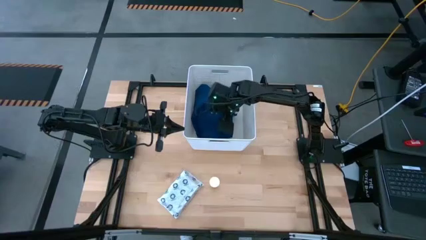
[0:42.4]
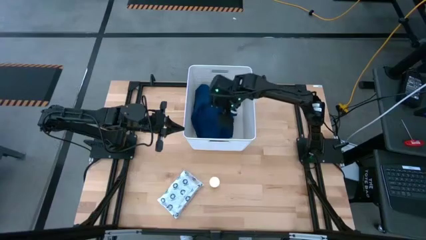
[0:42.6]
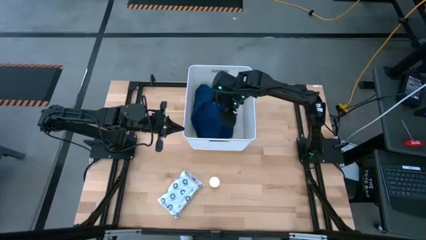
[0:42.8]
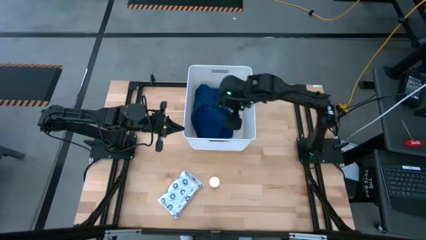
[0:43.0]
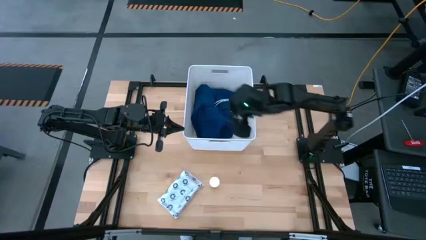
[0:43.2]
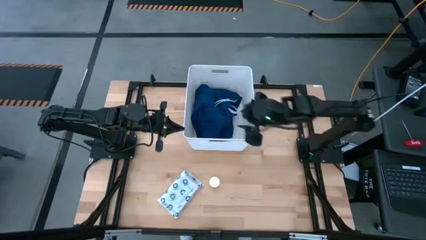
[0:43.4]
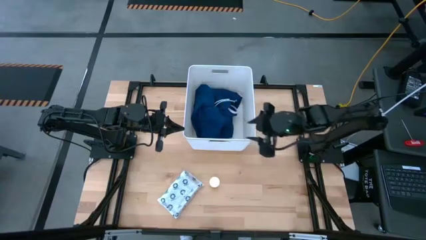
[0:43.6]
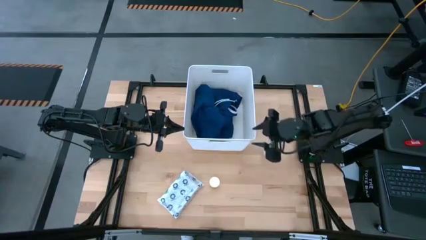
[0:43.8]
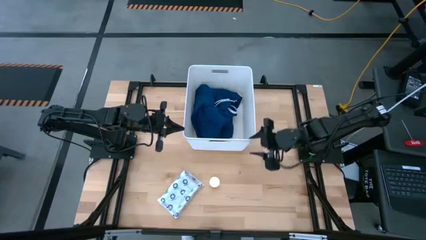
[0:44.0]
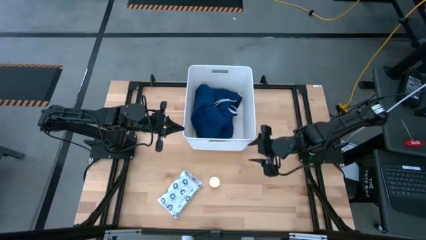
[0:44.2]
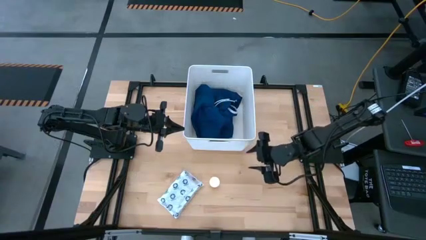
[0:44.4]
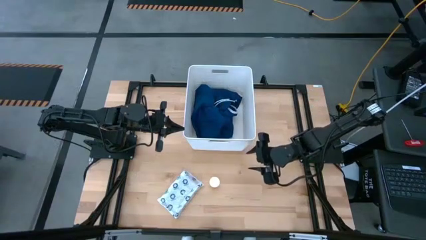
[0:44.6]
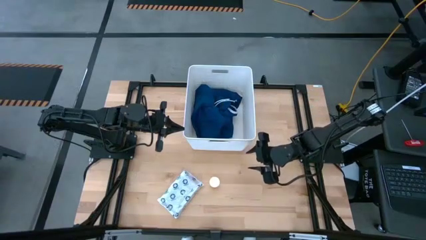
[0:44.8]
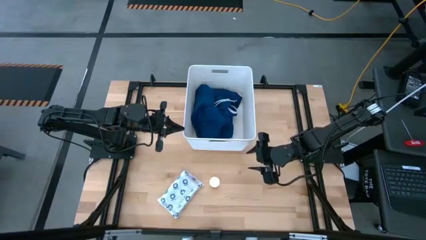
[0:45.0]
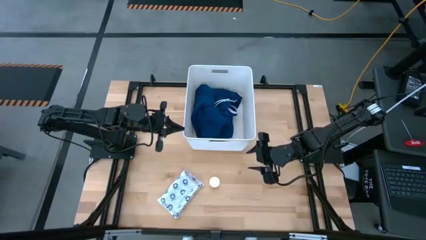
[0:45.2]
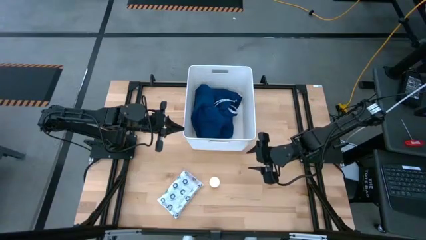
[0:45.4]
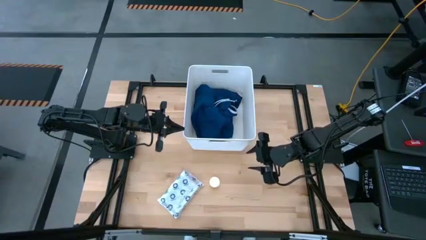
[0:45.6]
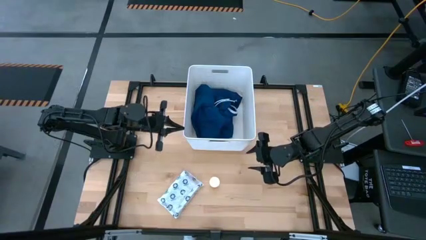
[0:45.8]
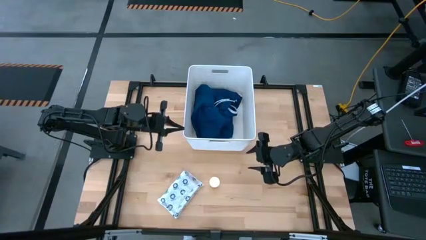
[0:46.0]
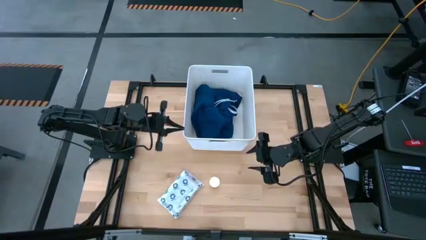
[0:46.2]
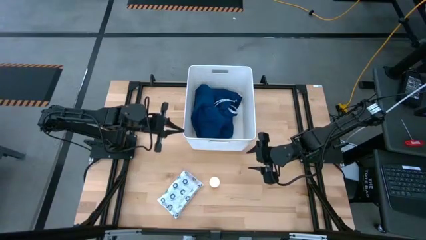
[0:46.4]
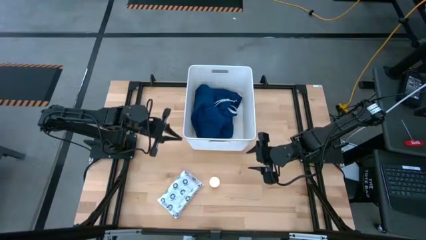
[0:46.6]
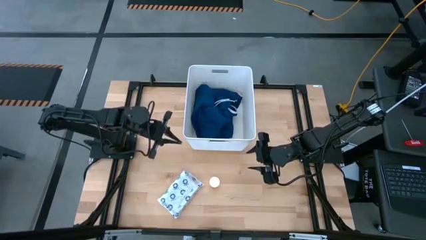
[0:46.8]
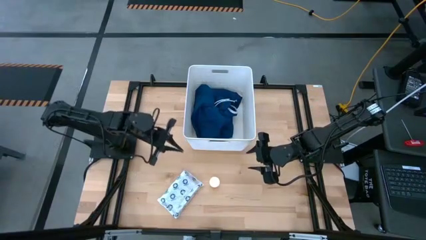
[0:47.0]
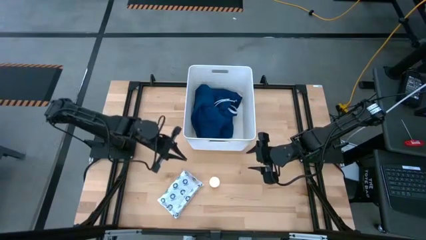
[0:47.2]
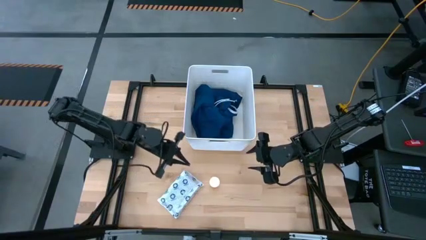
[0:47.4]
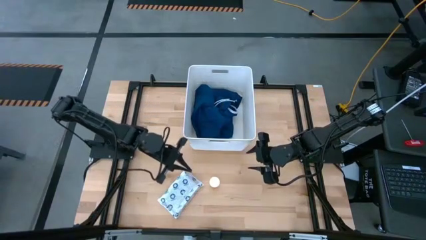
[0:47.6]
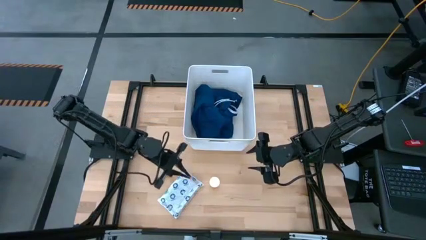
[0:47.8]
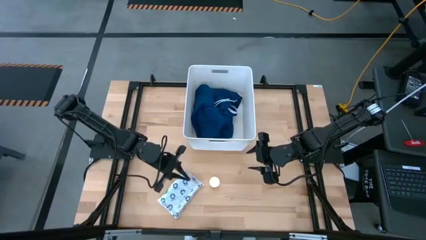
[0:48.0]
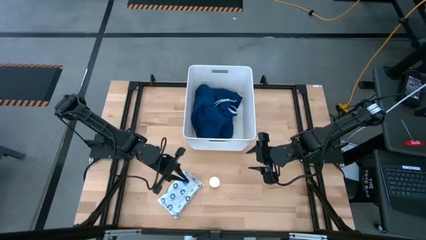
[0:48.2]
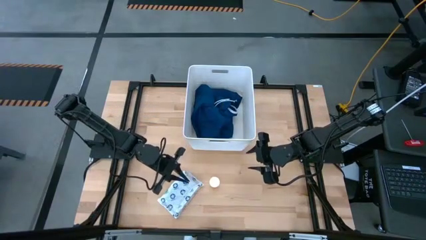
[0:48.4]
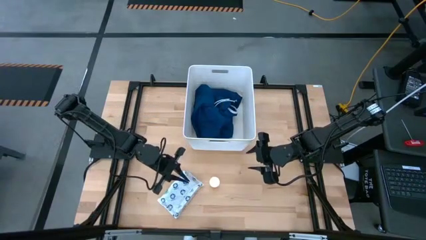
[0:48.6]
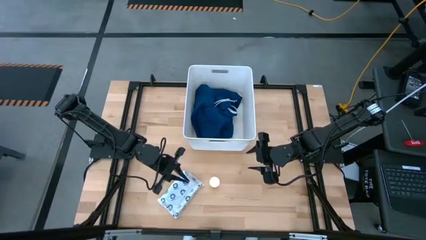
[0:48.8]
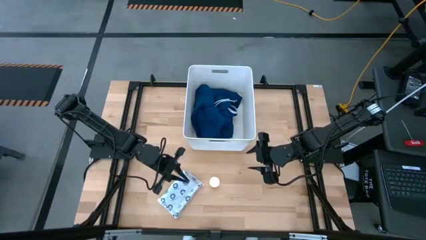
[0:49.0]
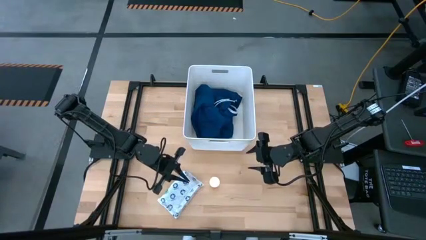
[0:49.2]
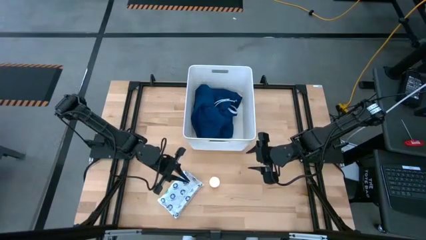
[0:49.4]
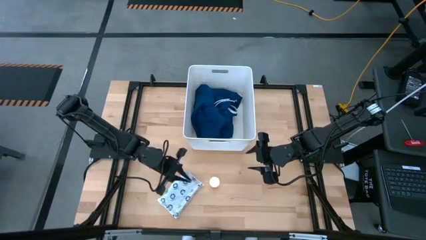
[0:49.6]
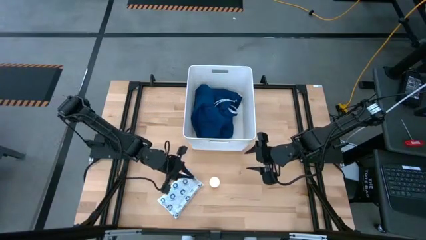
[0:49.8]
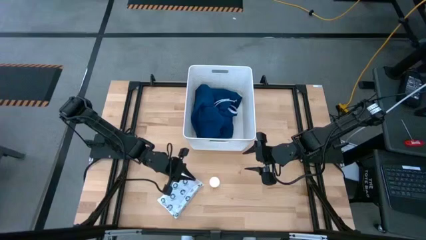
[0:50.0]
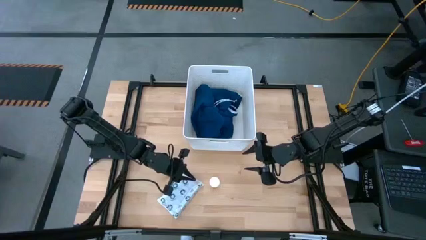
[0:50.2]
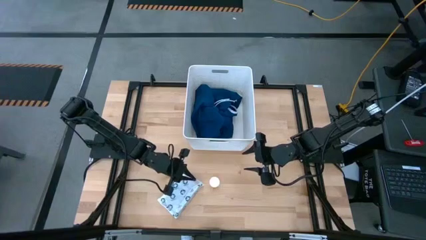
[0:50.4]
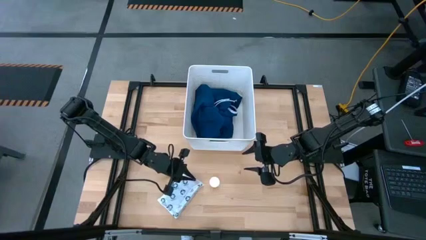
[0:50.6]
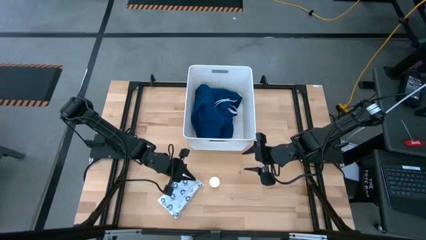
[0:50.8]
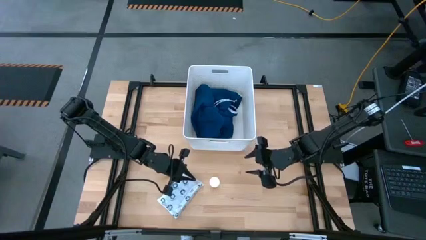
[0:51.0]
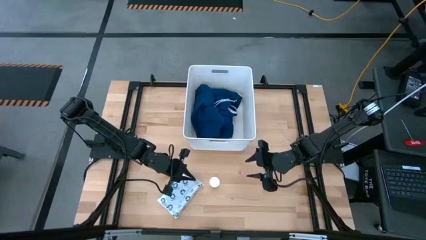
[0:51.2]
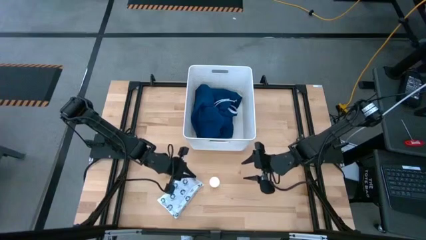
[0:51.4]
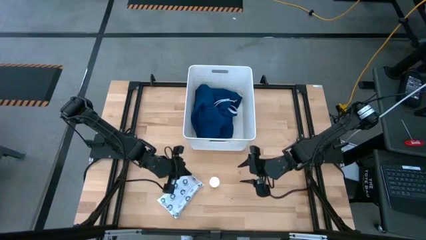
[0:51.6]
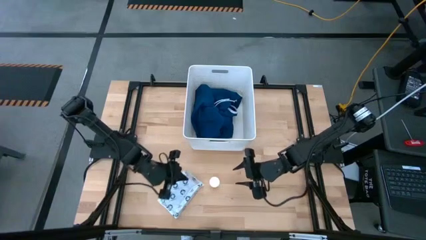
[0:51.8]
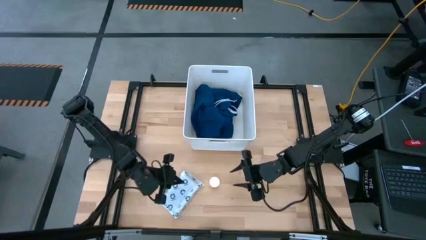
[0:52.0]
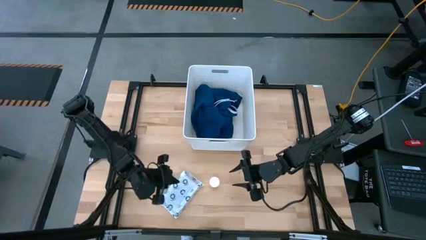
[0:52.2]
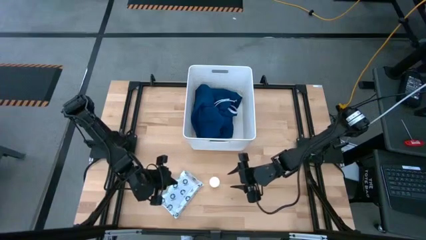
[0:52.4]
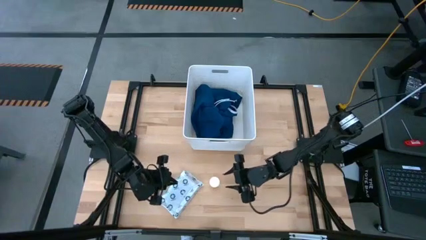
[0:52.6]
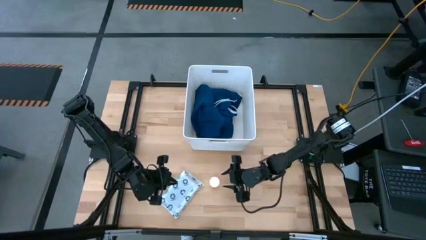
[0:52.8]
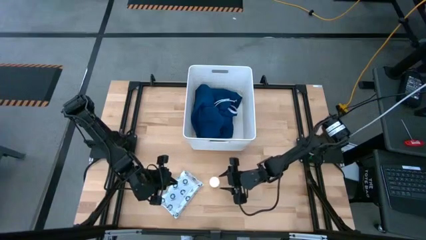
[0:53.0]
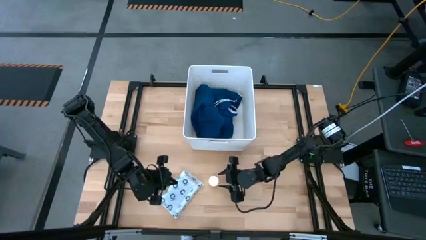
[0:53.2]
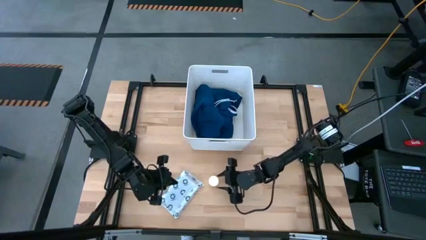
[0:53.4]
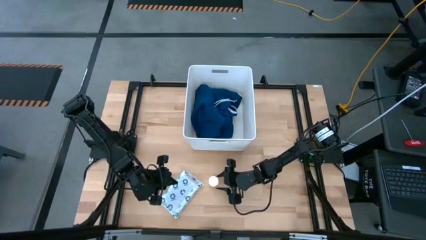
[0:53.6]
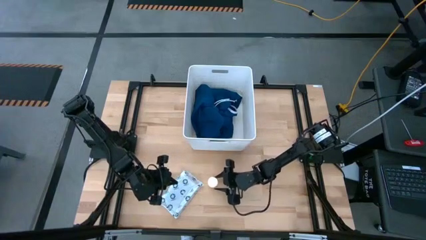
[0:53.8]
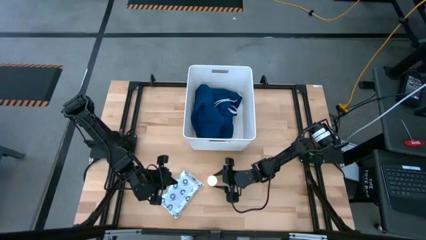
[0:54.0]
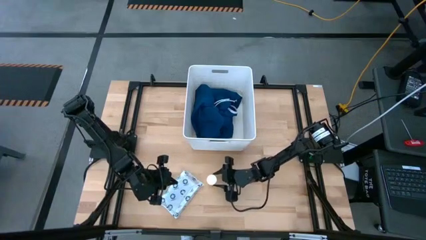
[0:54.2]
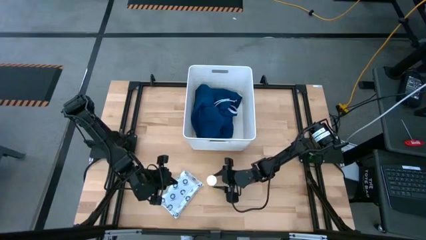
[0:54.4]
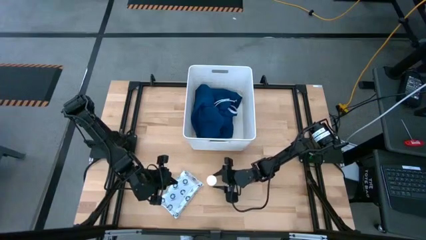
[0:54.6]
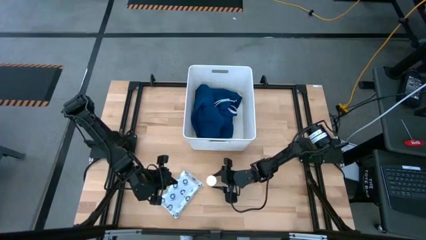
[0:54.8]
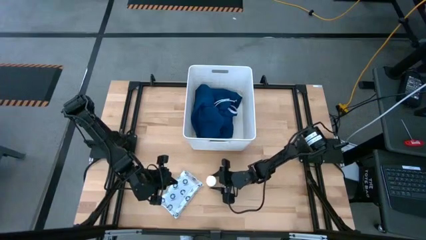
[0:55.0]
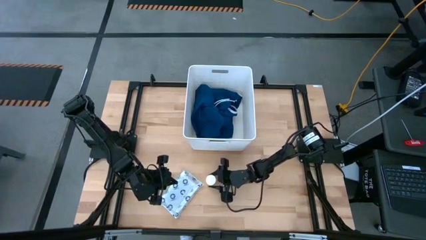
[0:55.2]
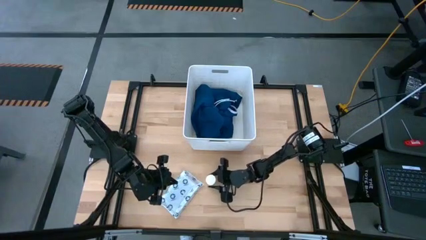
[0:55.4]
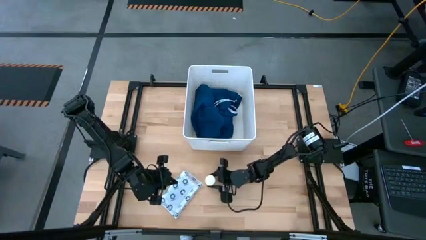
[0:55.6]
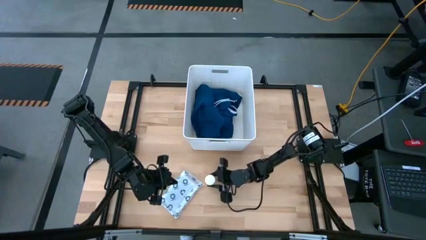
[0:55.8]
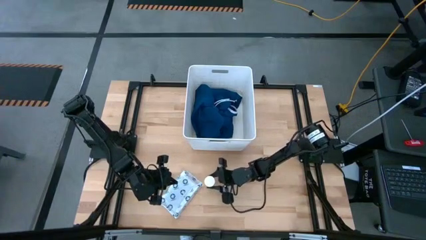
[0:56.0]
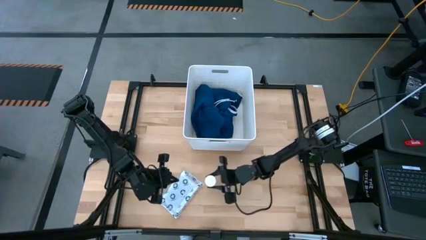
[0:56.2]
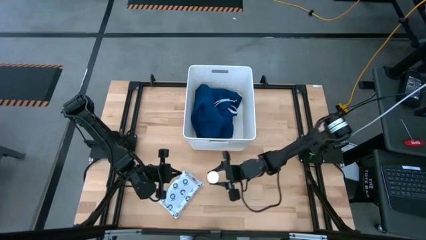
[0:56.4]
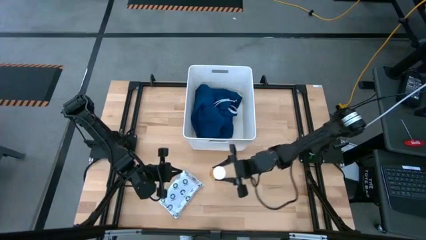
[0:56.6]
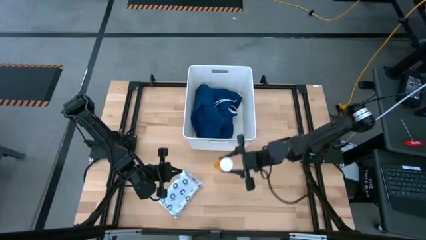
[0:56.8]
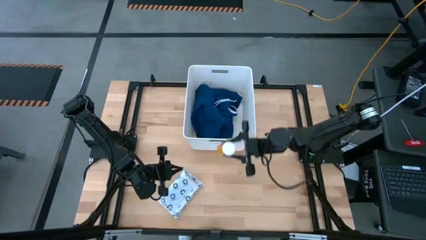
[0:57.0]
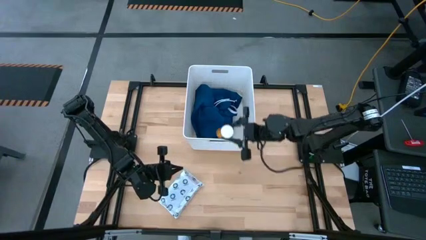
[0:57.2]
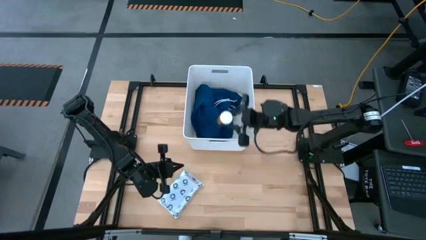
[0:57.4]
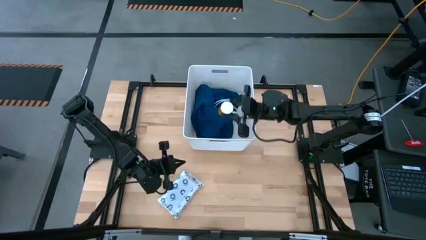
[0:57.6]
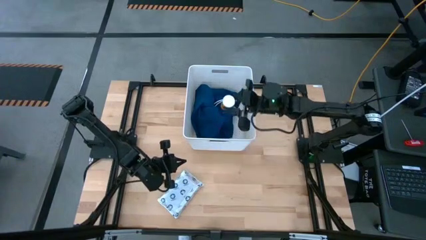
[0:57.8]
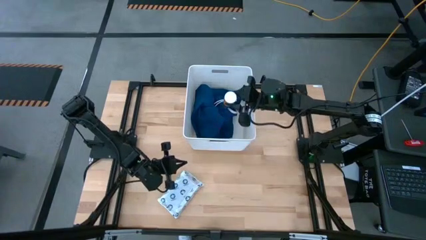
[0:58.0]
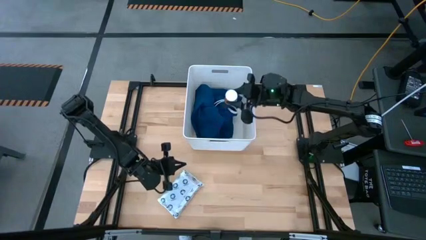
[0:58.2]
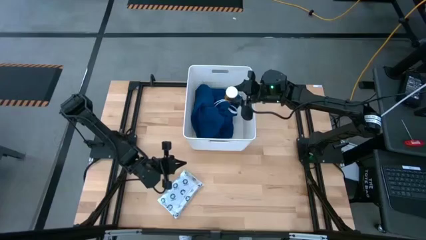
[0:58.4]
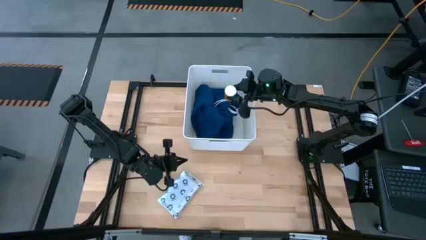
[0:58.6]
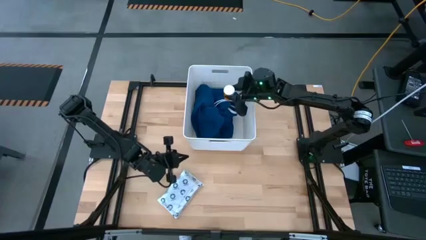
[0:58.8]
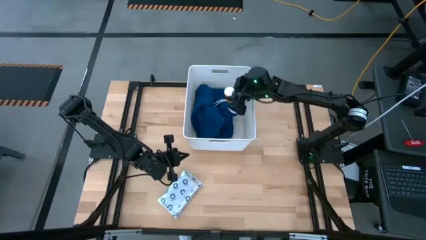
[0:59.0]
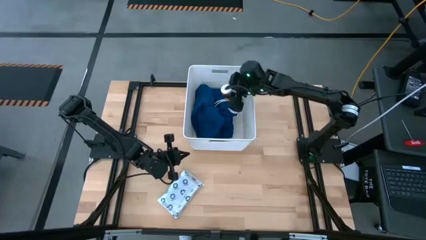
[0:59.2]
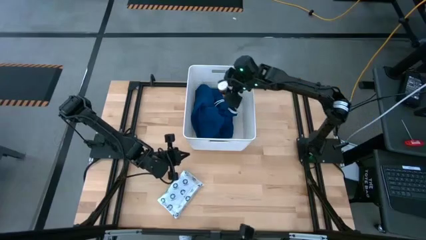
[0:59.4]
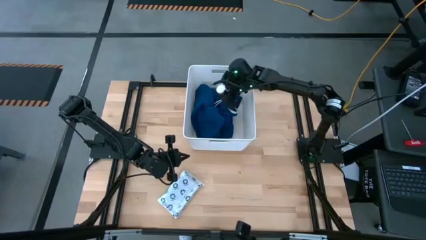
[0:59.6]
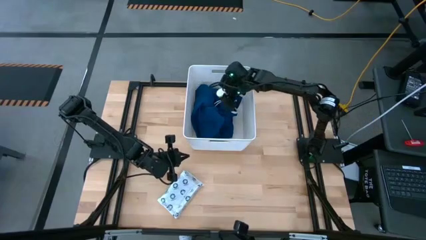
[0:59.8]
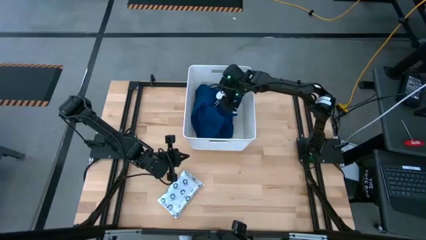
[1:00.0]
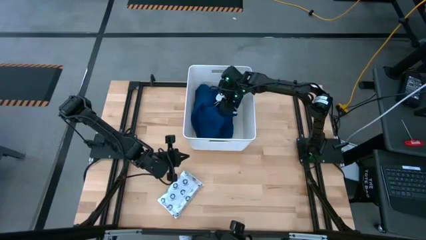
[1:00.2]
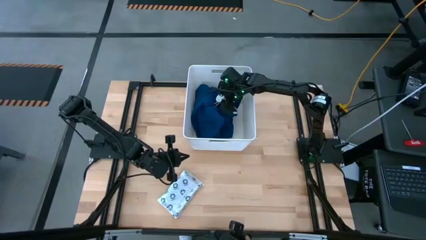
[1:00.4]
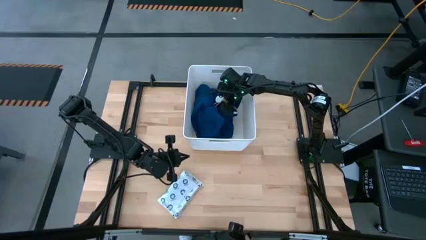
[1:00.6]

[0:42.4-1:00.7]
Task: Pick & place medical supplies in basket/bin
Put the orange pill bottle into the white bin
